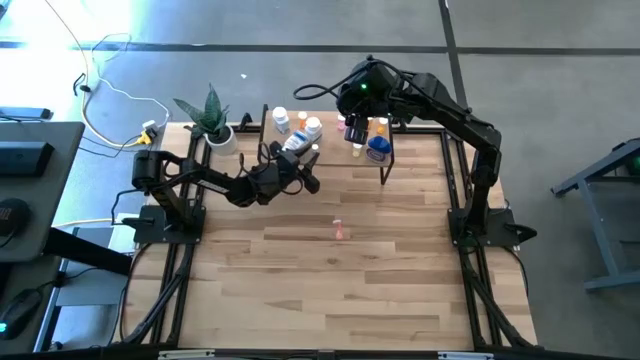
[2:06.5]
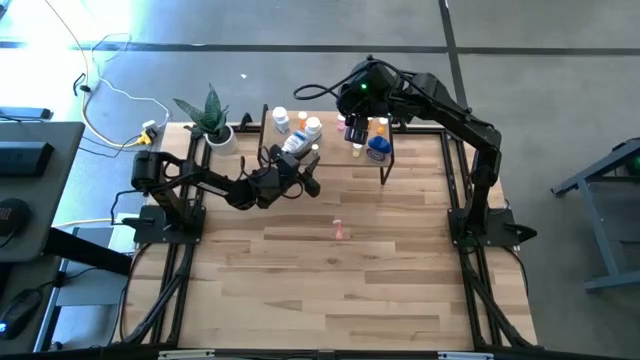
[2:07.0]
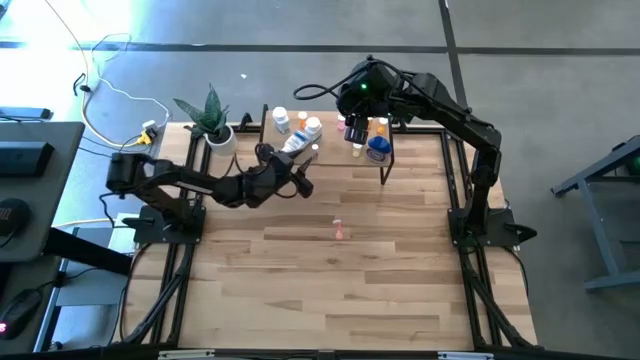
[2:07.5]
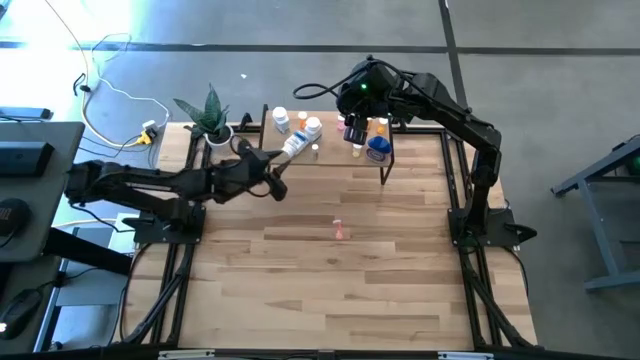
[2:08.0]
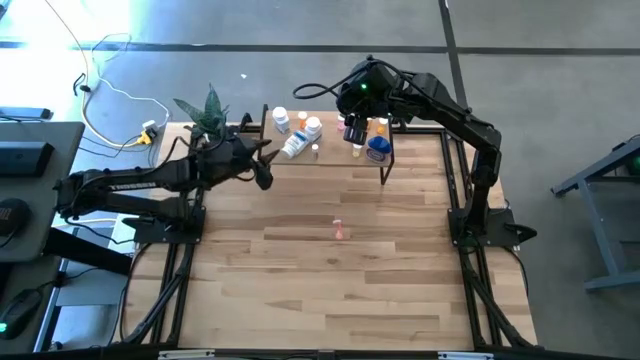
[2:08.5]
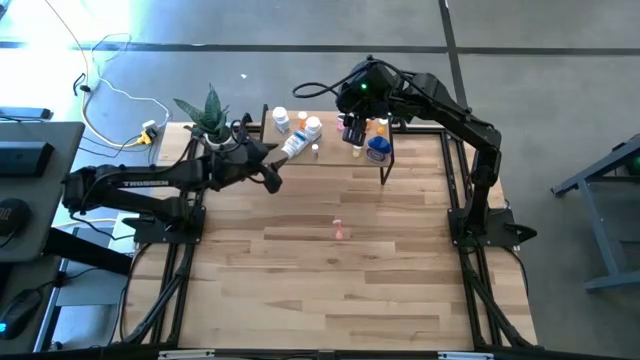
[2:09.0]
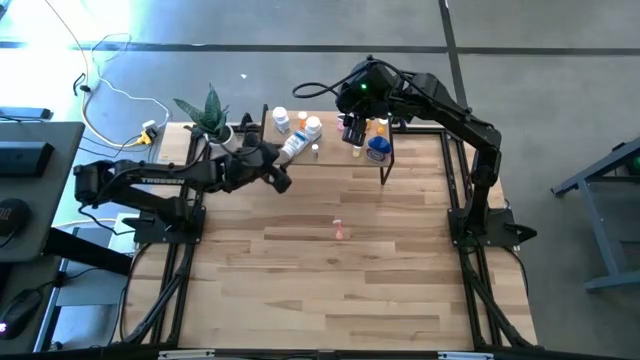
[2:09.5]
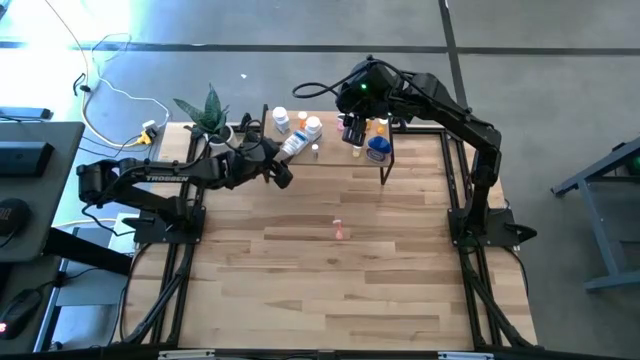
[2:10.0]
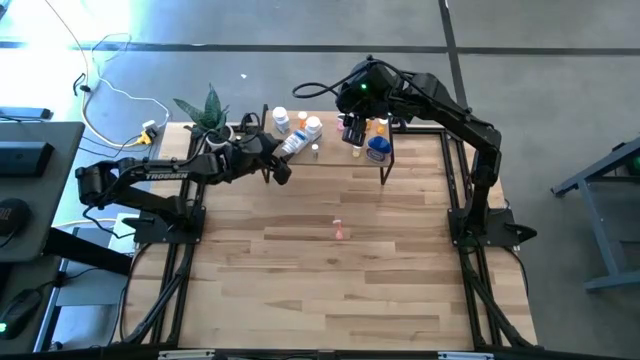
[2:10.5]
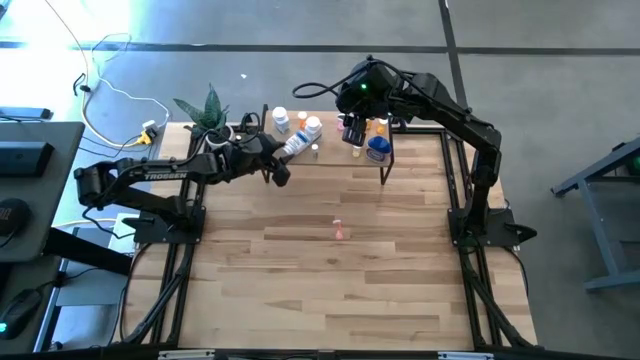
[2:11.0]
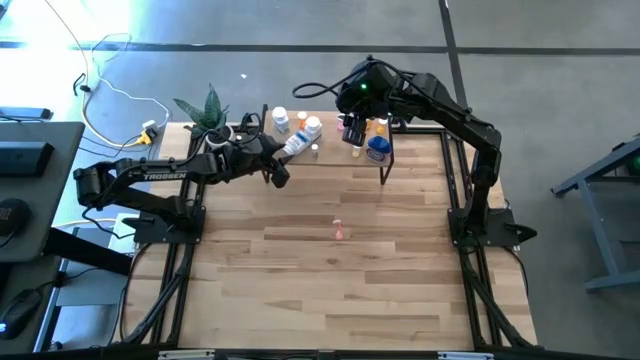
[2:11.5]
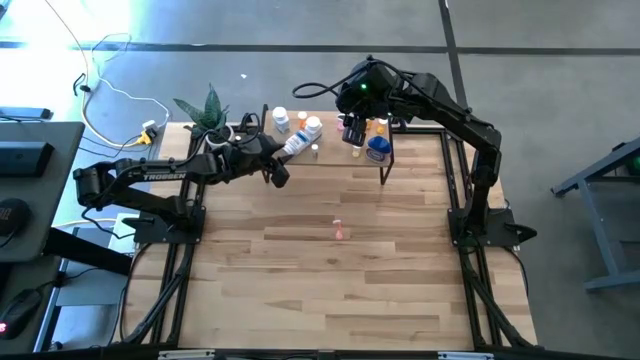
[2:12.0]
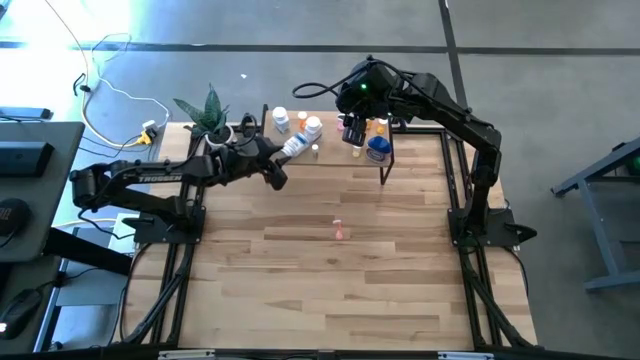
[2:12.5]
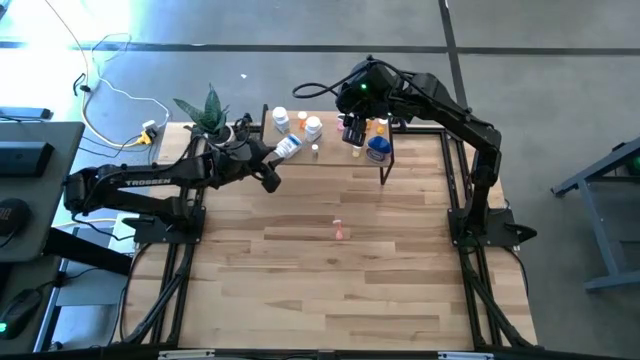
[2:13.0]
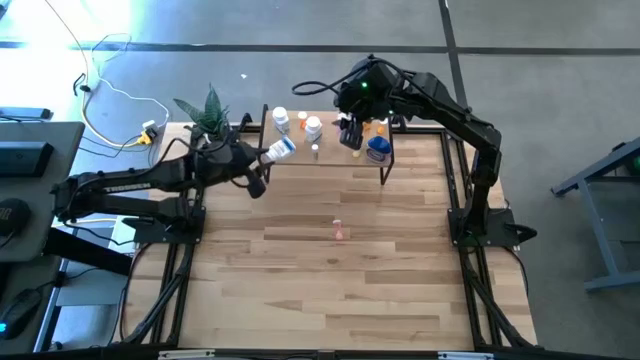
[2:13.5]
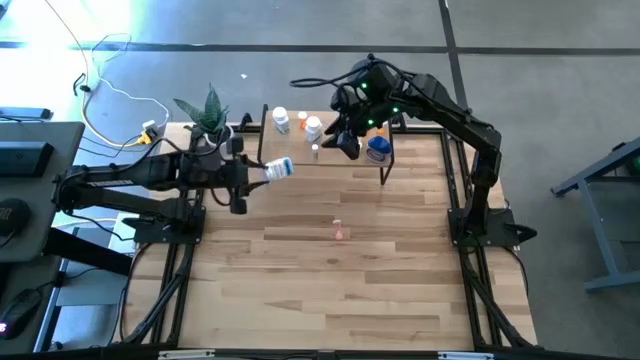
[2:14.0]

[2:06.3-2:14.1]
Task: Pick and place medicine bottles onto shelf by color
Adjust the white pill bottle on the shelf

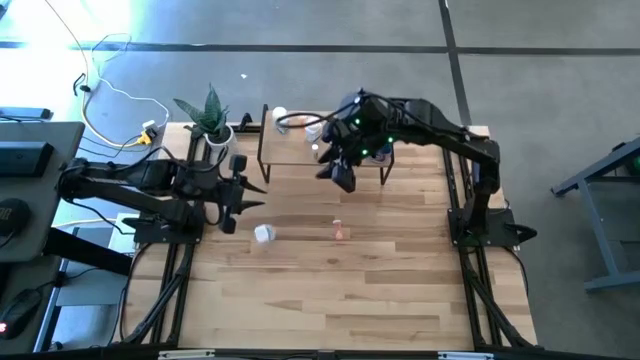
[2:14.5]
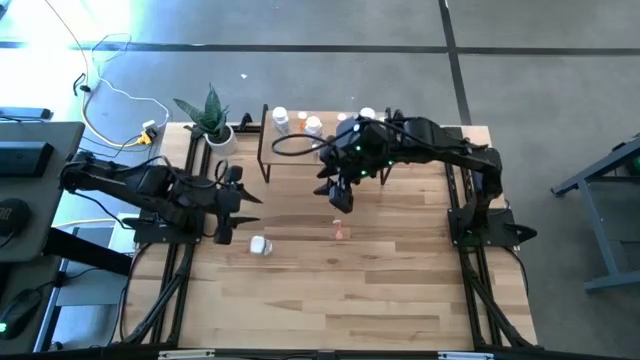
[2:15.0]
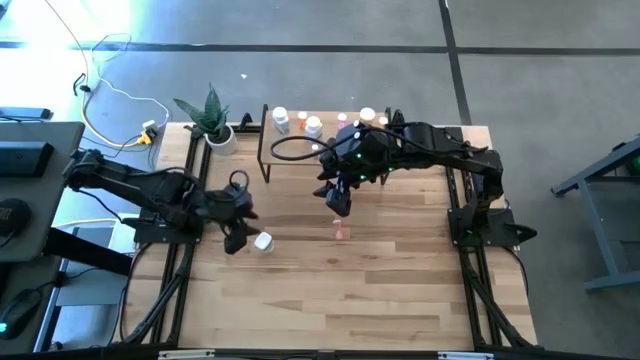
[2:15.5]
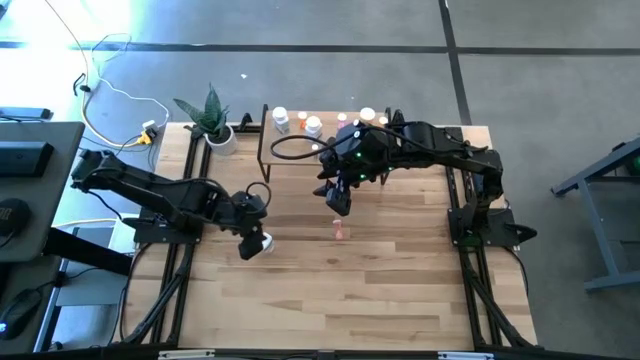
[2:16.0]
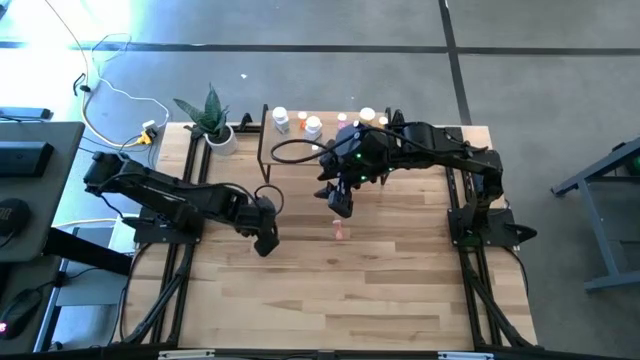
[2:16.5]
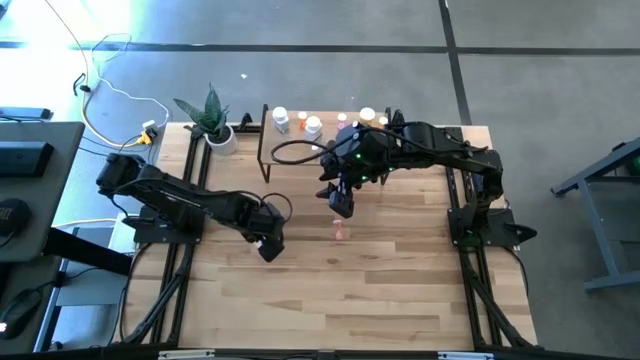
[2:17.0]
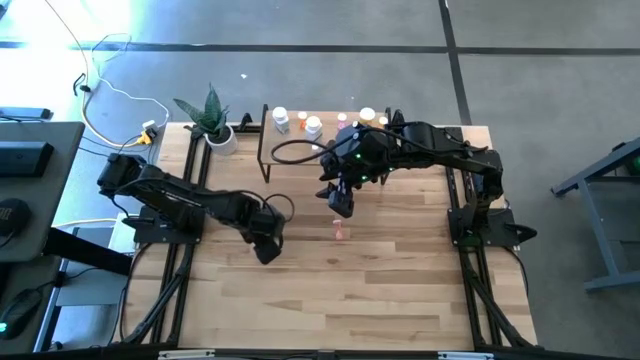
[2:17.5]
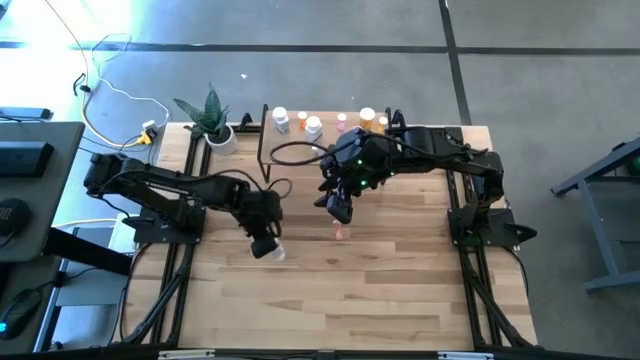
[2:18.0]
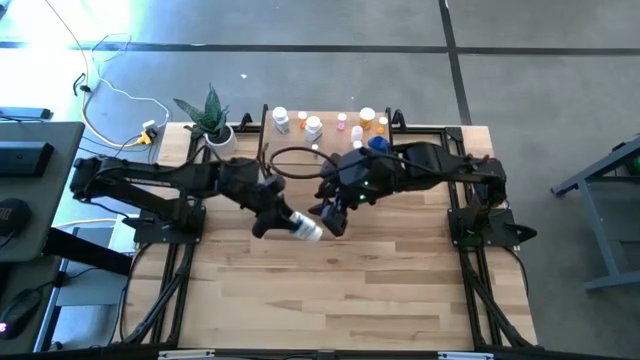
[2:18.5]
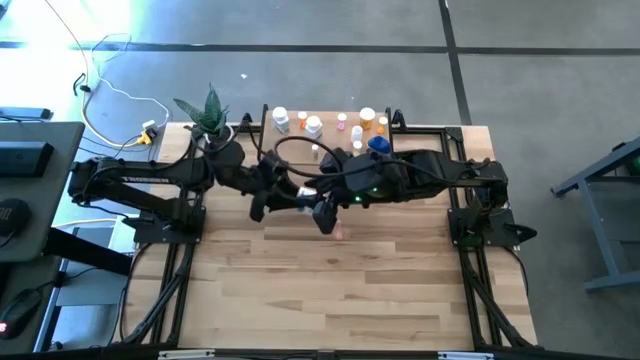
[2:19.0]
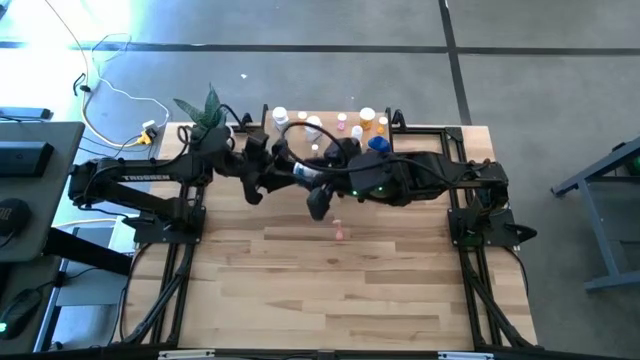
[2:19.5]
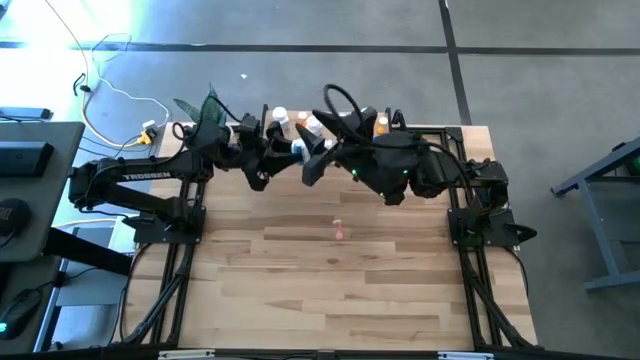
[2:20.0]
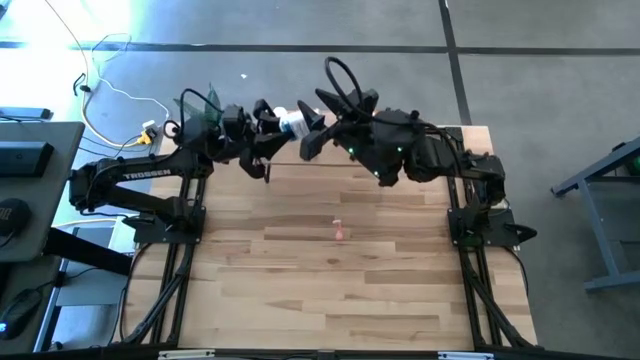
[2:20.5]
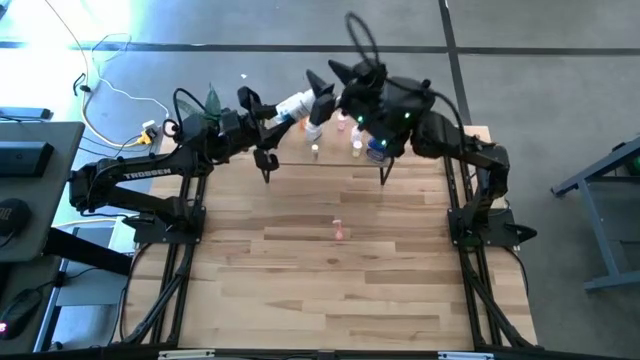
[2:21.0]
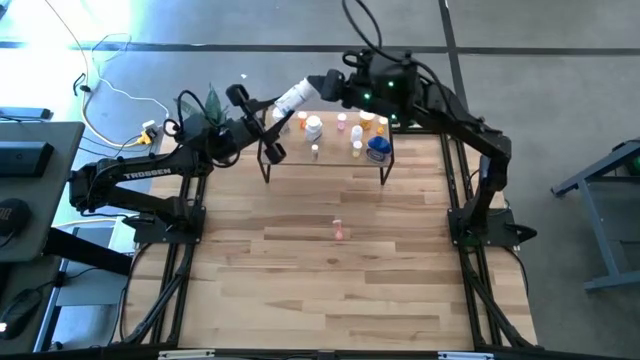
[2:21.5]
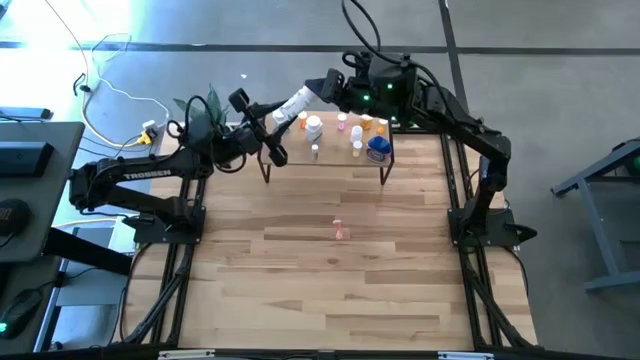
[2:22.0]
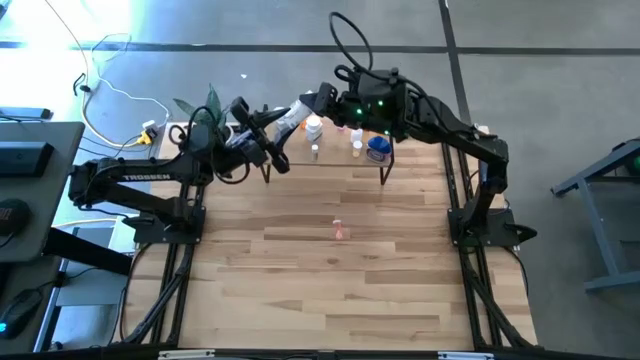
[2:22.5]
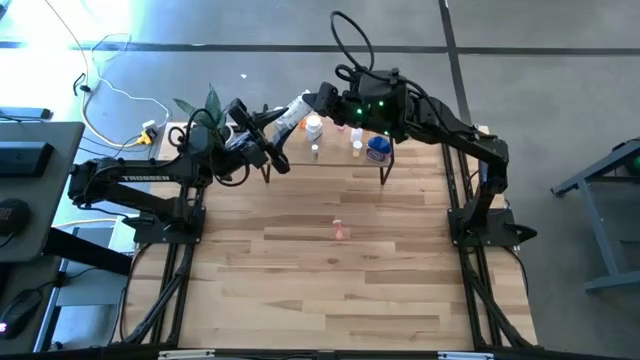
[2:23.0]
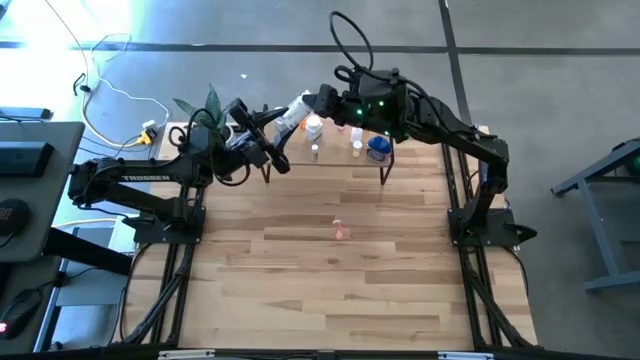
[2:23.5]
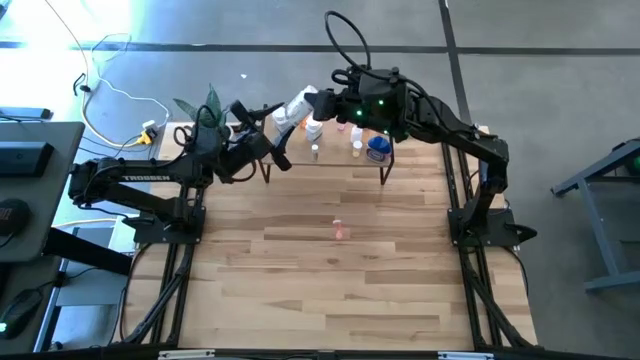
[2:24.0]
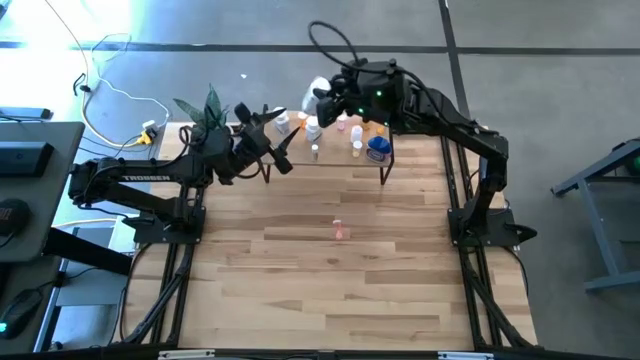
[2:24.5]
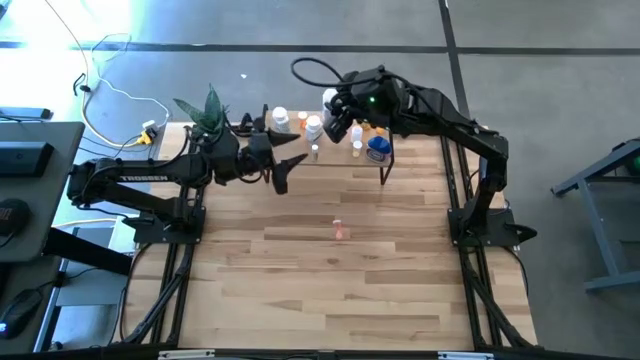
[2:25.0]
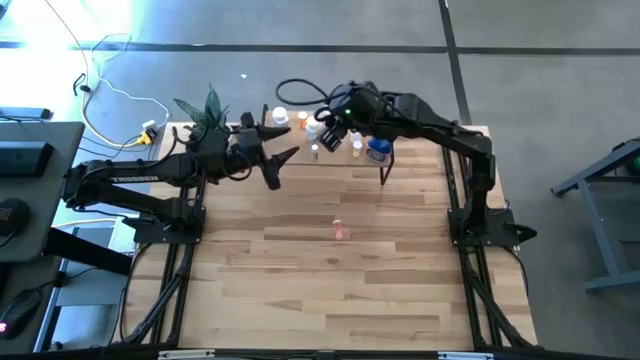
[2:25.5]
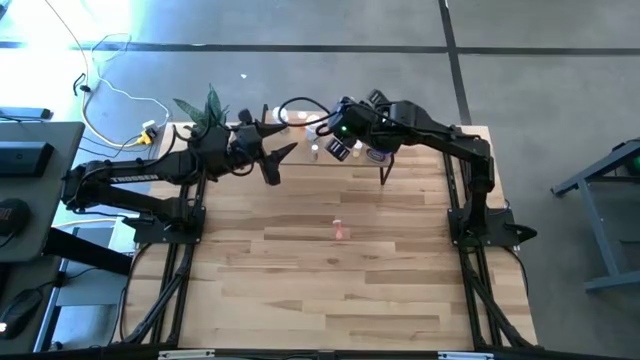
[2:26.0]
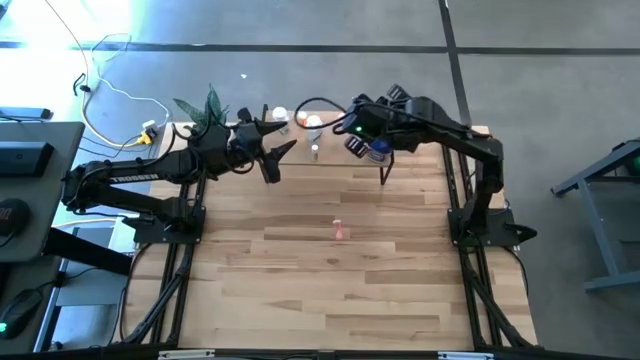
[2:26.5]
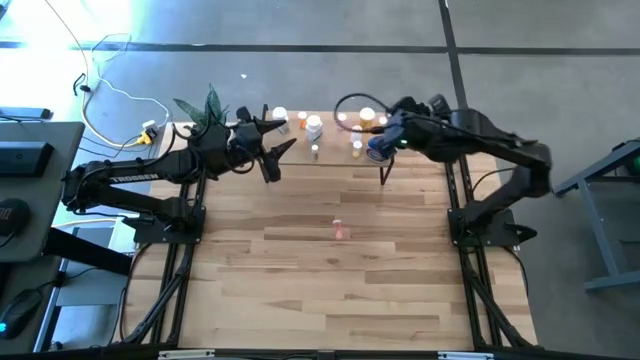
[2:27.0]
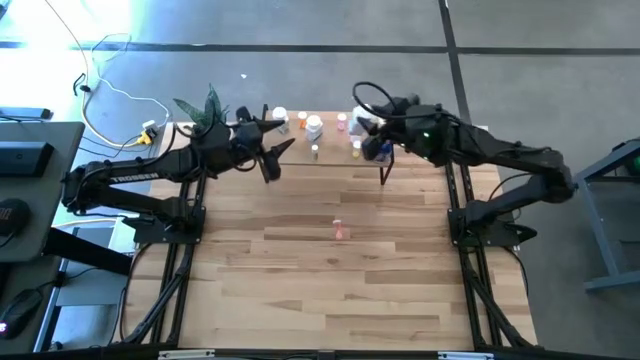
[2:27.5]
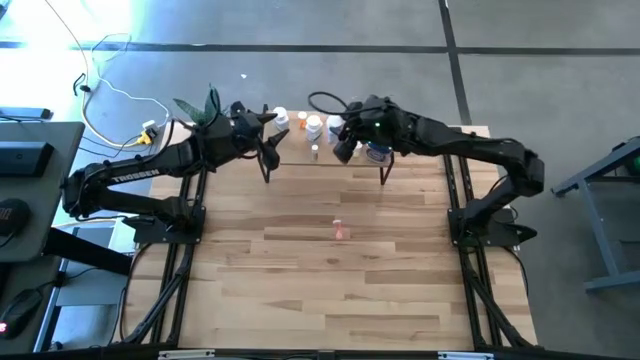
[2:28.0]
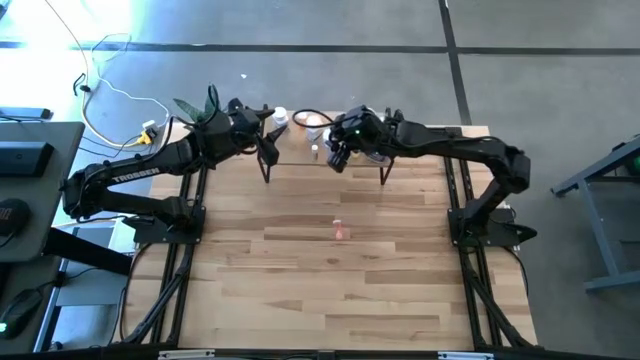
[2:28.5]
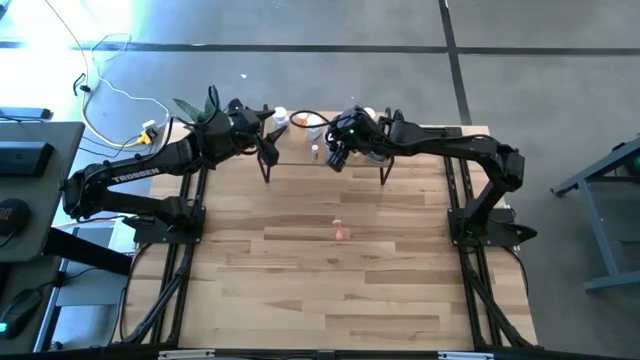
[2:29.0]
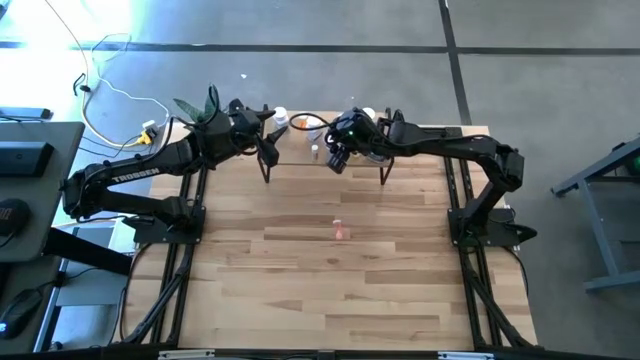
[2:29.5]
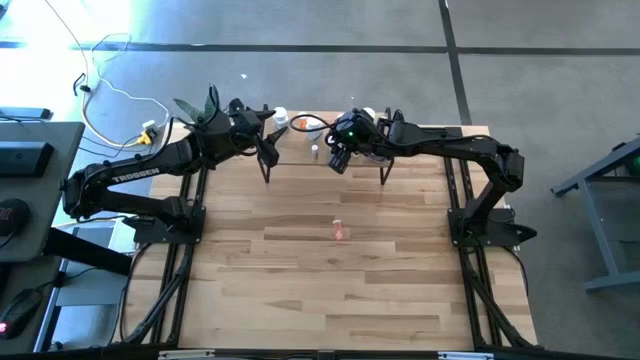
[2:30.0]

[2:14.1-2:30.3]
Put the white pill bottle on the shelf
